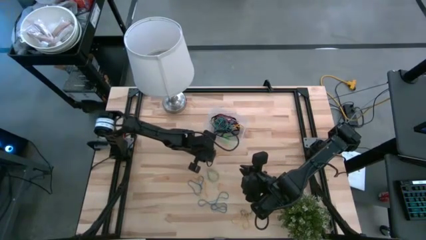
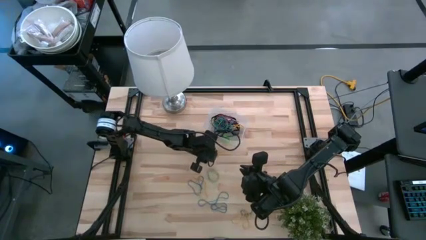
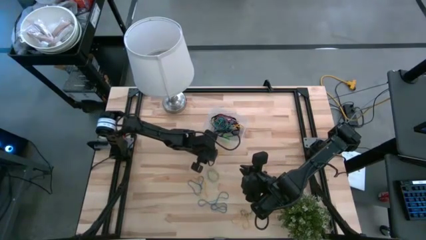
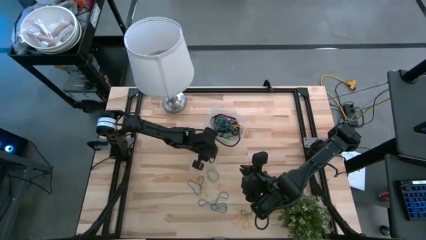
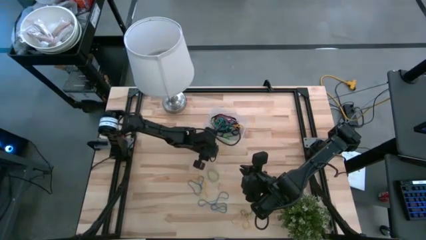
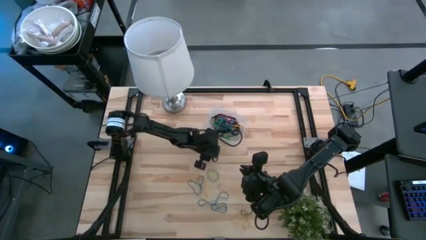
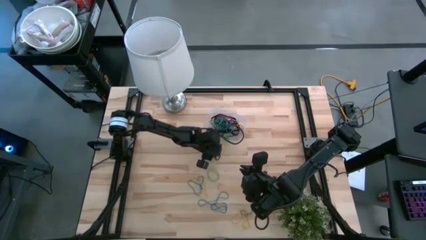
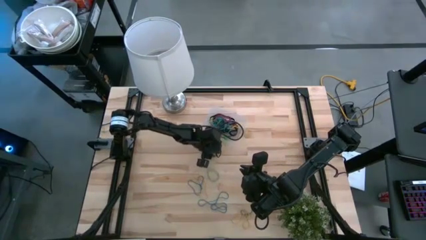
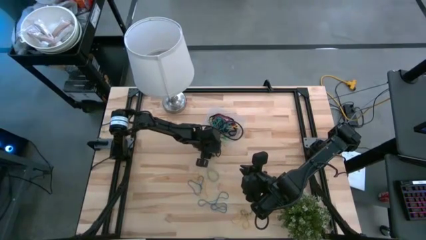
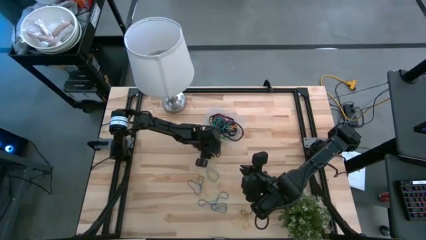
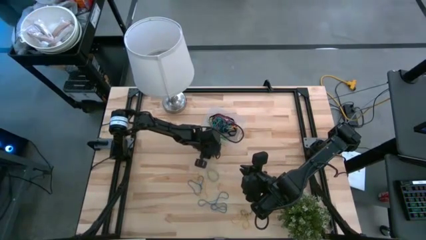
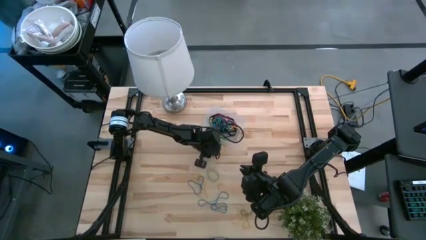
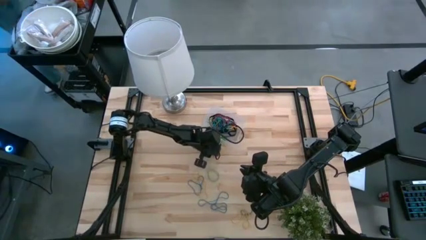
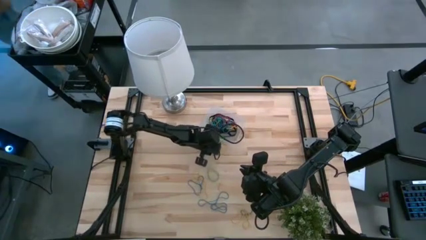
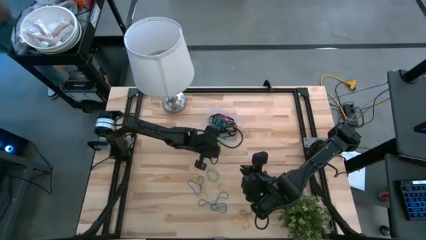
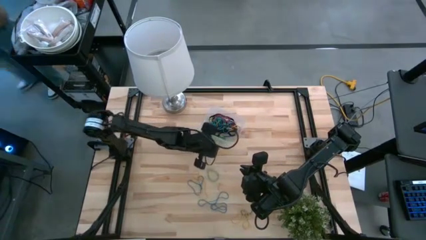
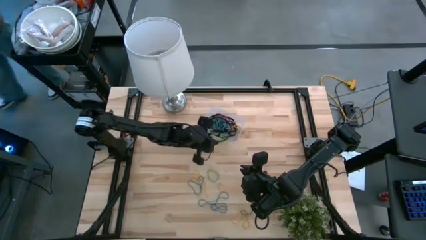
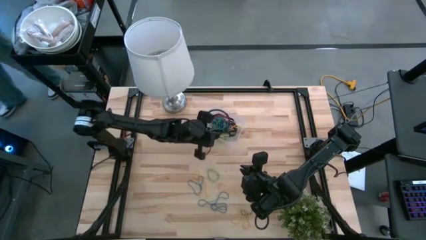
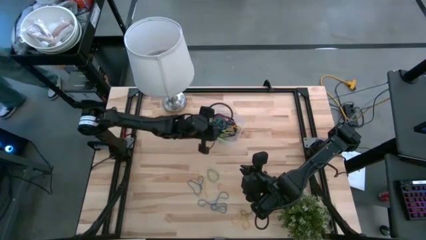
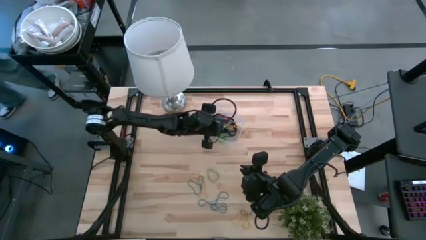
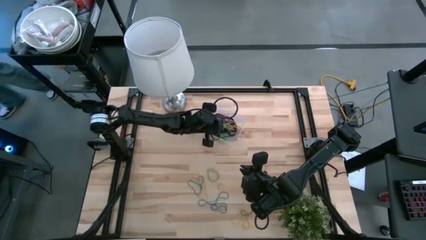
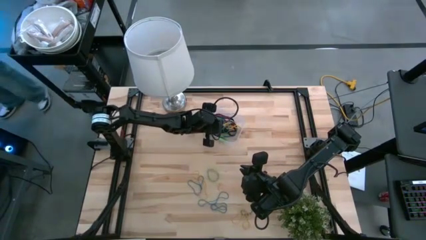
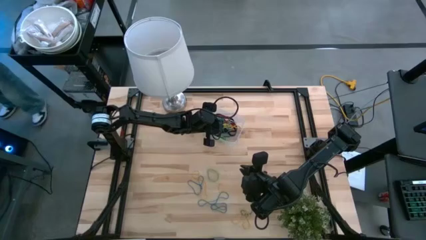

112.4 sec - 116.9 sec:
Task: Pick and place rubber bands into bin
Put the yellow rubber bands into the bin

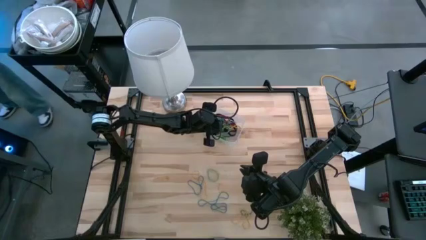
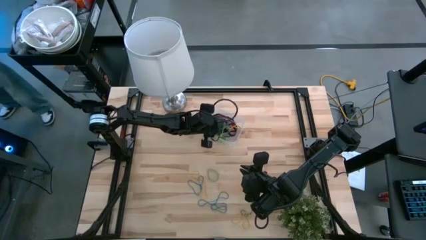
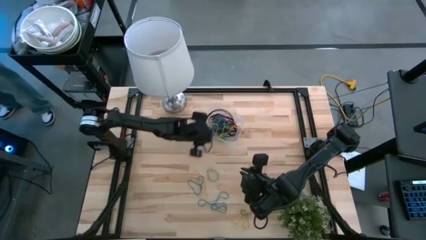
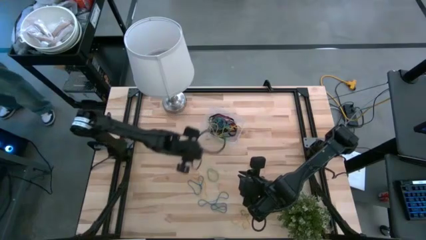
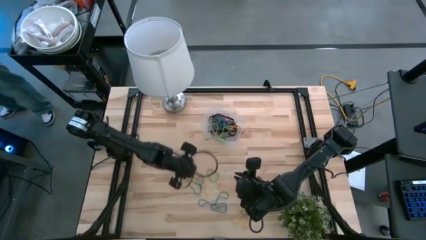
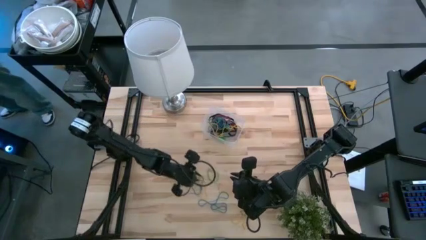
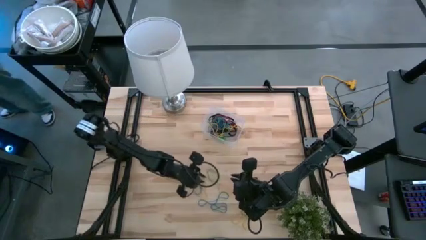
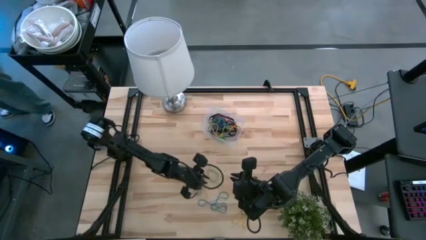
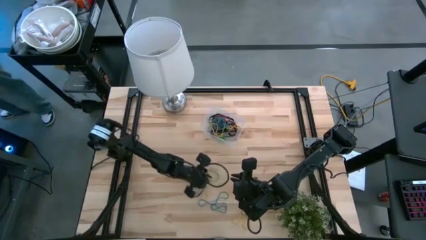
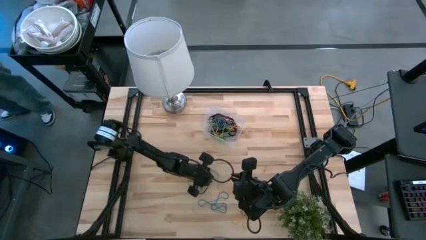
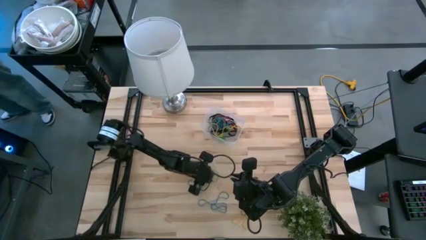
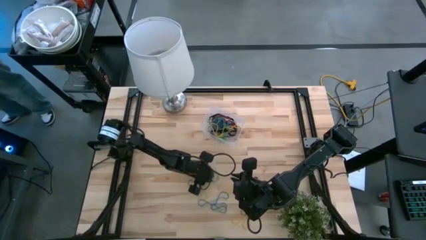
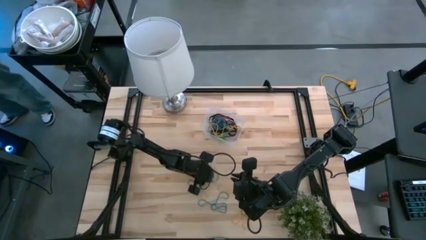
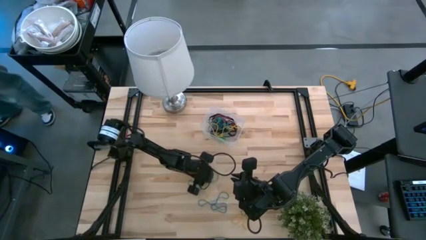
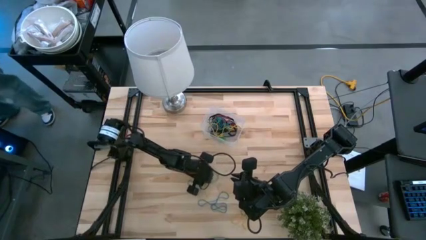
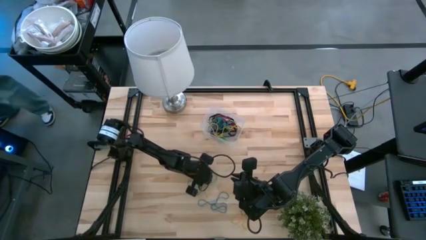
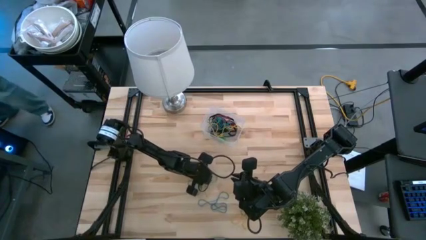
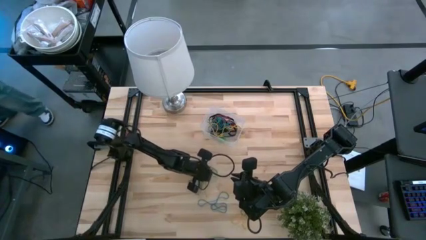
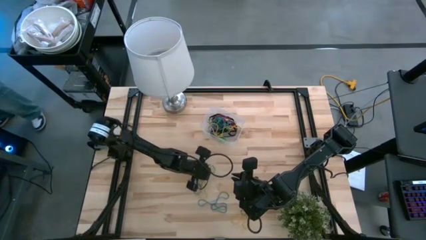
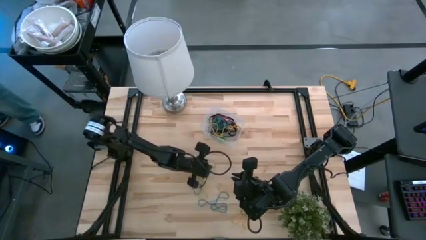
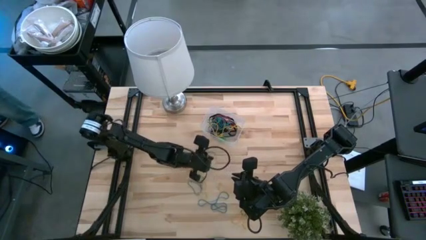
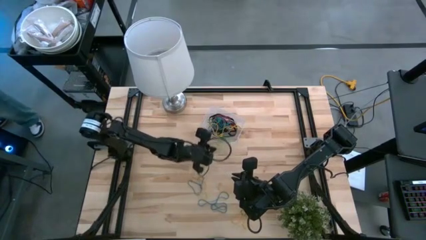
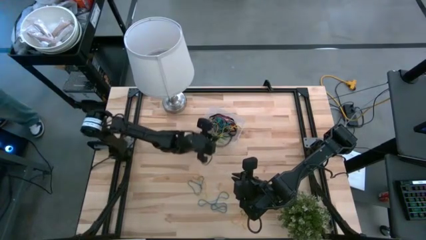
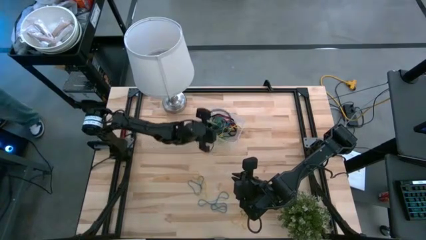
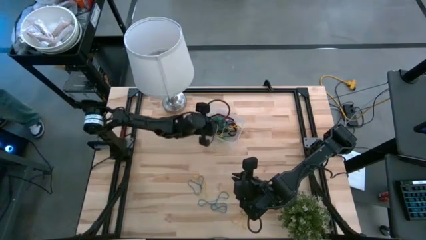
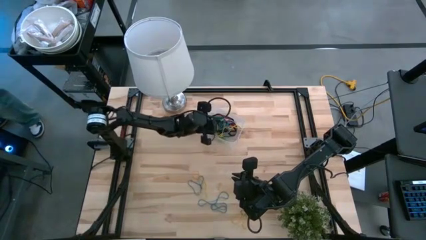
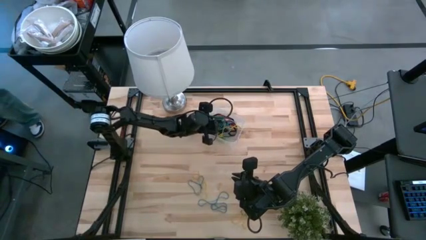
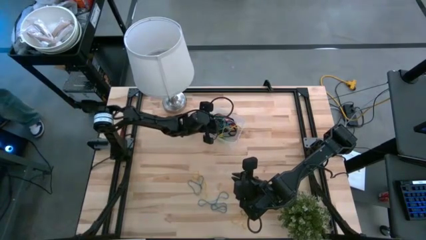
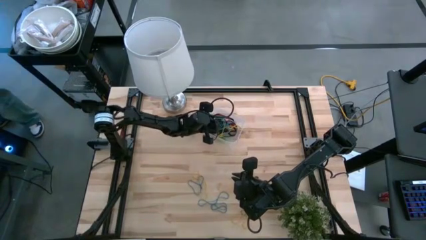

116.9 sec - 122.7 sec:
Put the green rubber bands into the bin

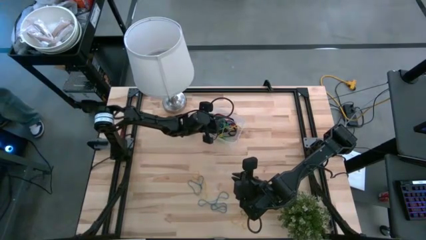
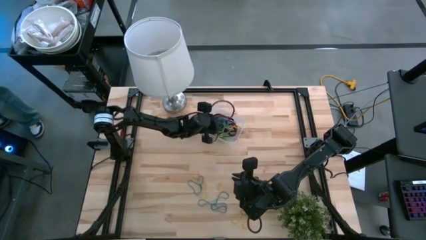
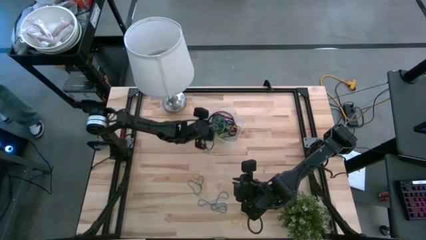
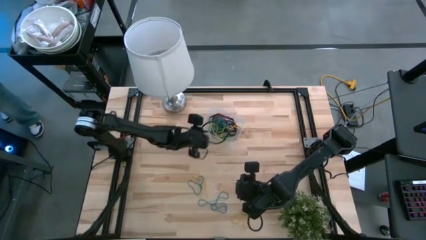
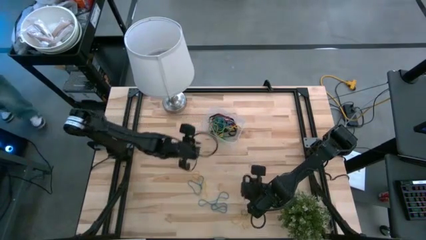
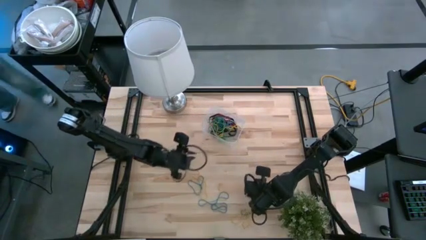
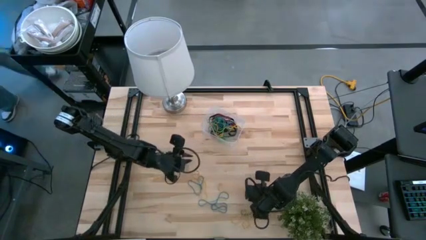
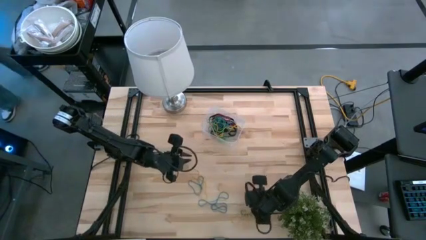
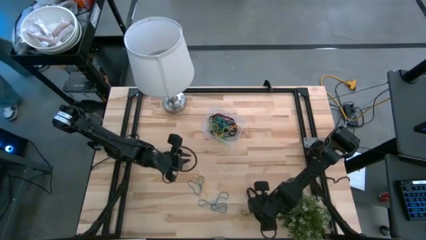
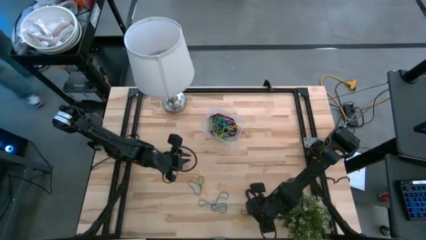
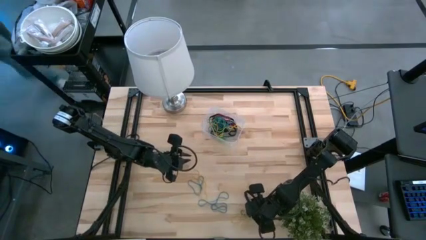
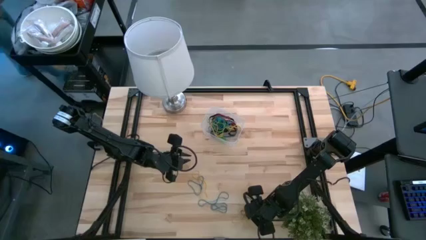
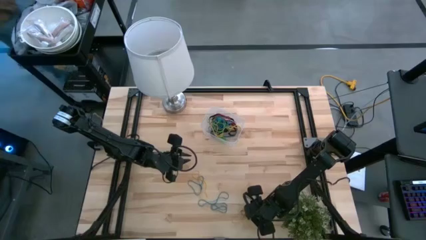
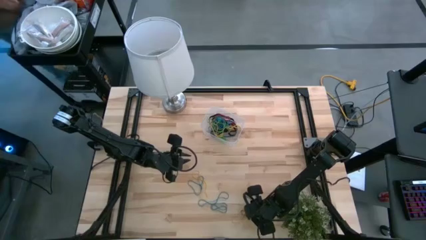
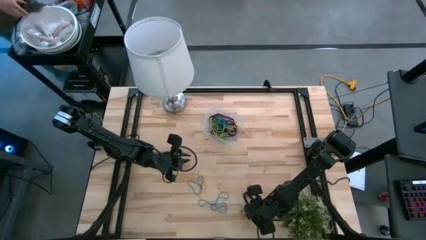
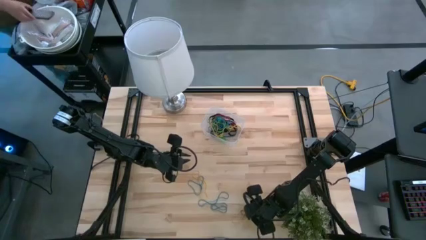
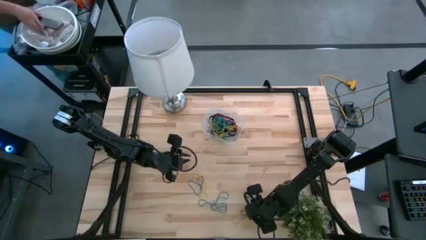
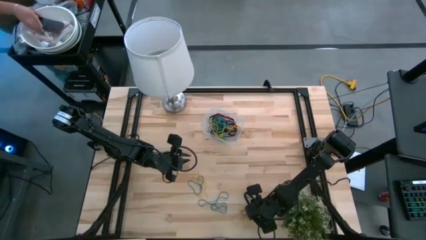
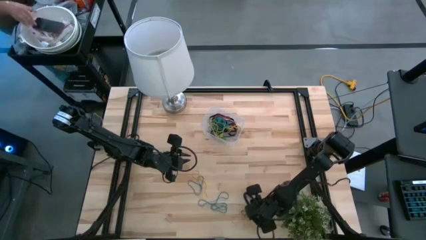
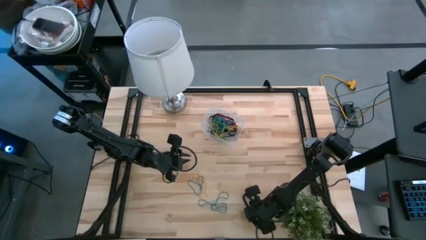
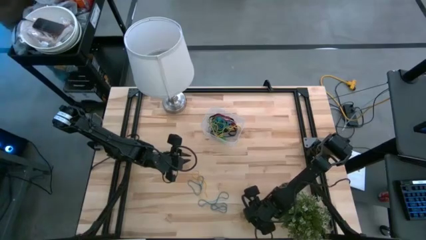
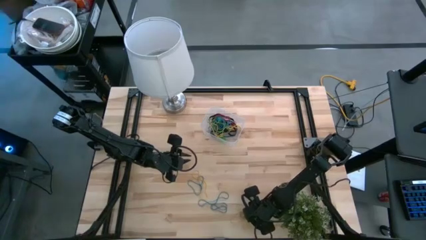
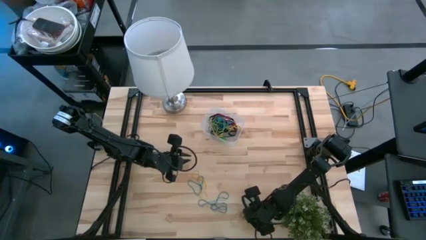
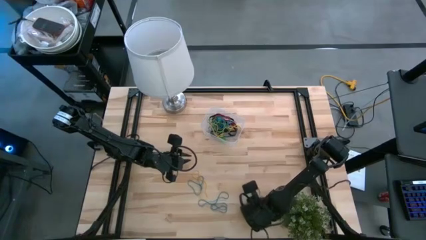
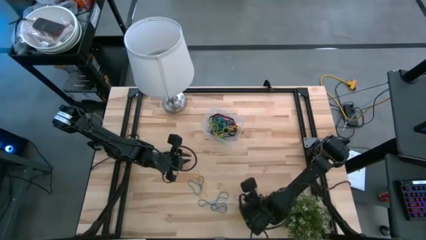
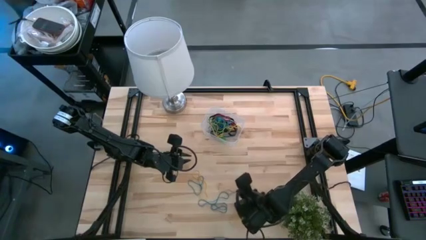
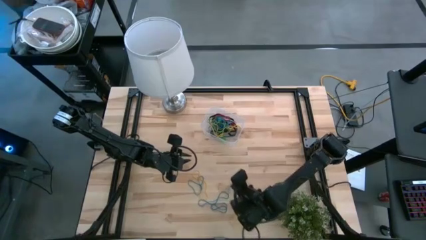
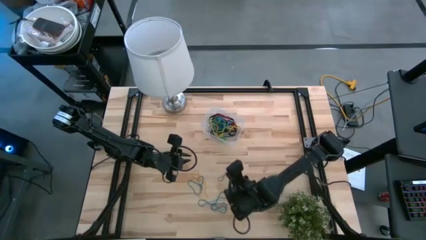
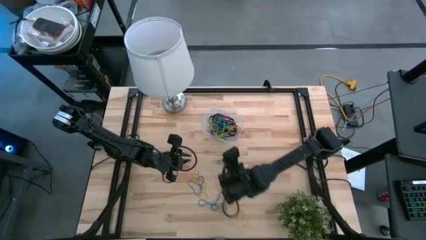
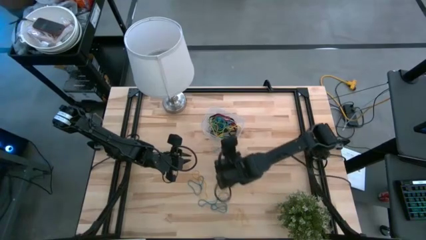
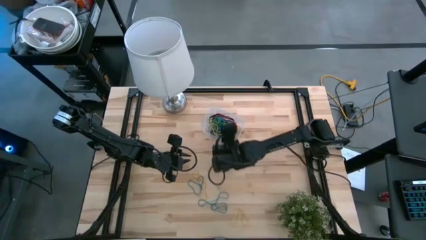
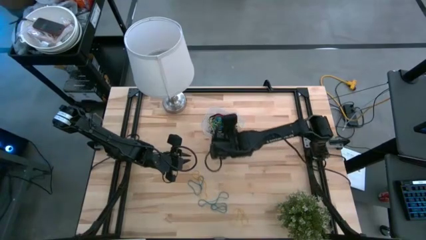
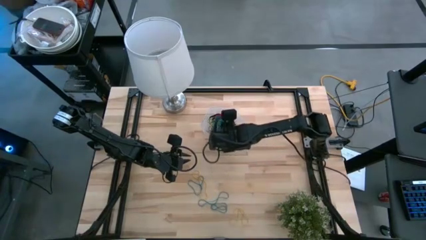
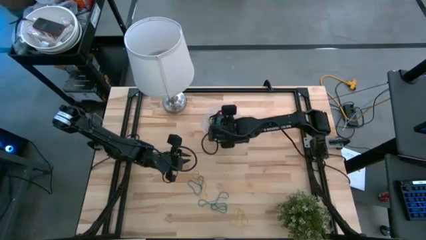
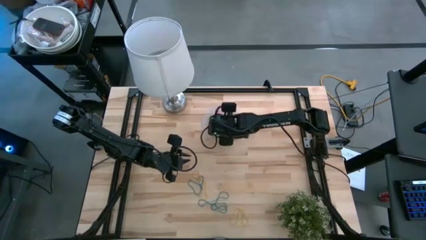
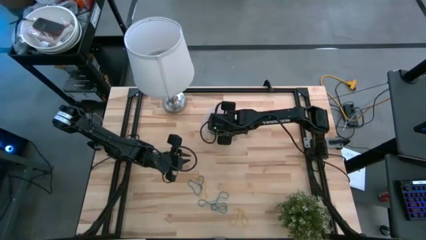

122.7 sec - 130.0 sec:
Put the blue rubber bands into the bin
